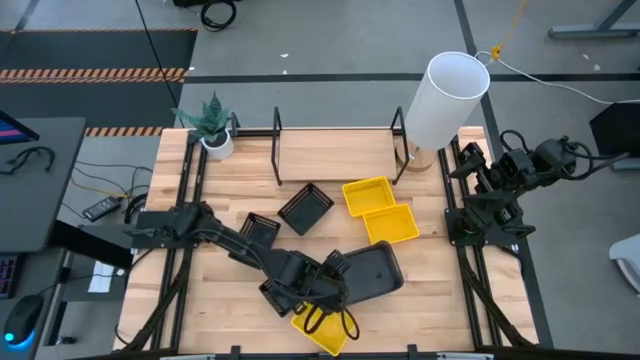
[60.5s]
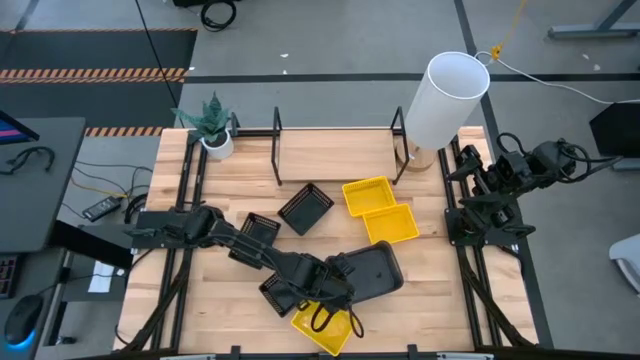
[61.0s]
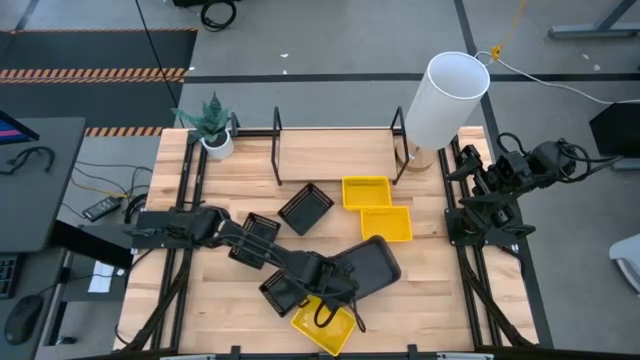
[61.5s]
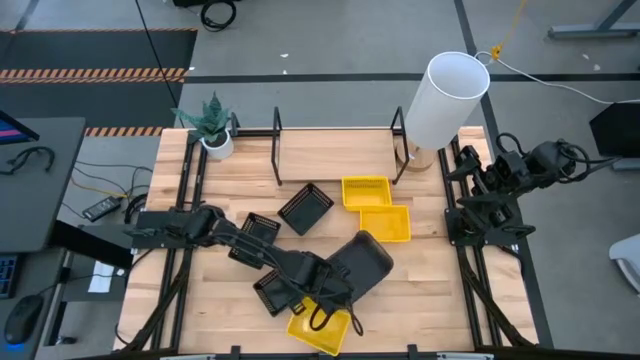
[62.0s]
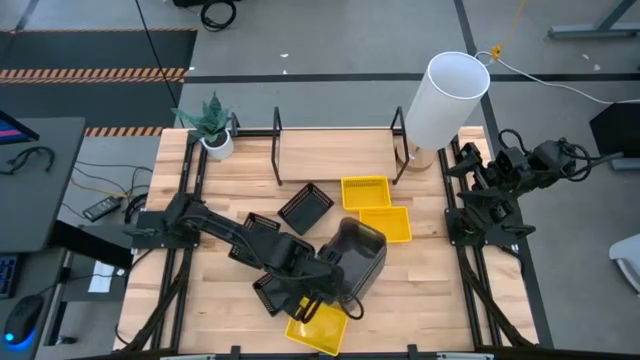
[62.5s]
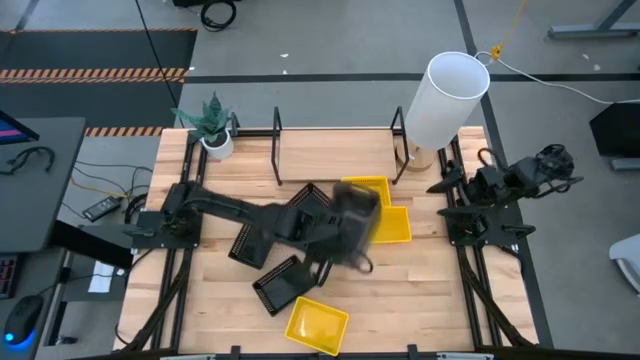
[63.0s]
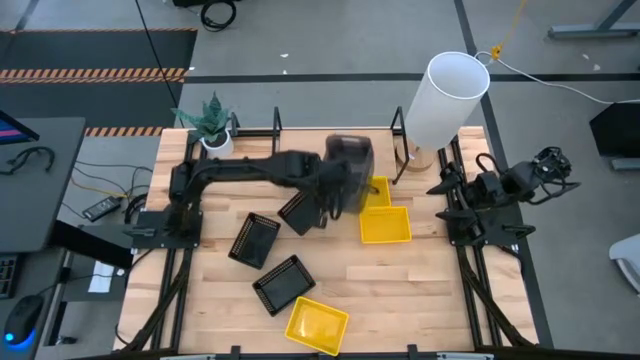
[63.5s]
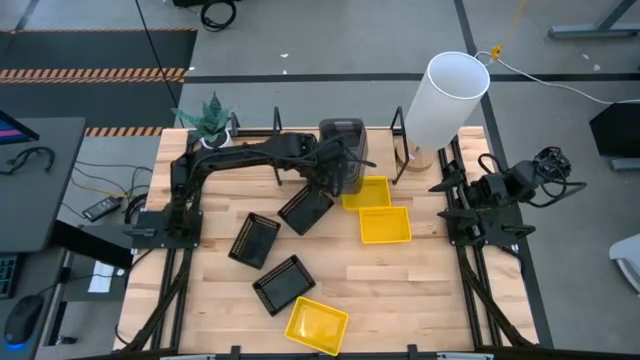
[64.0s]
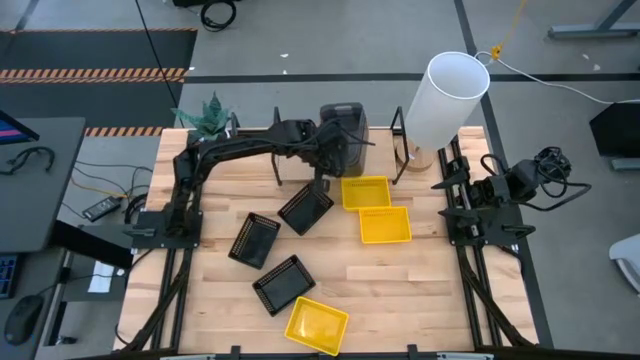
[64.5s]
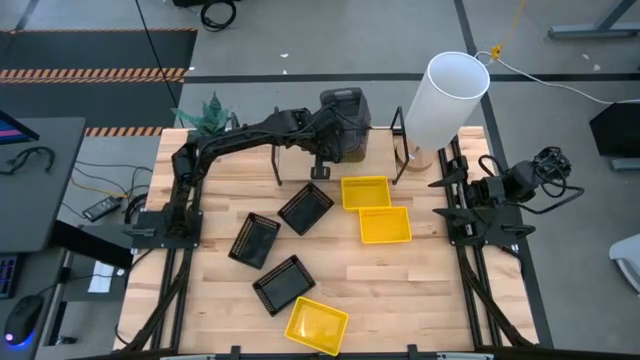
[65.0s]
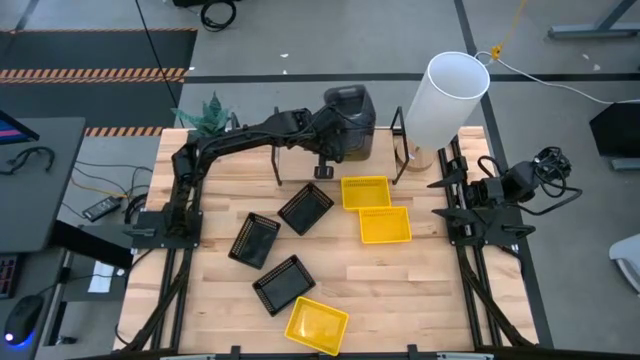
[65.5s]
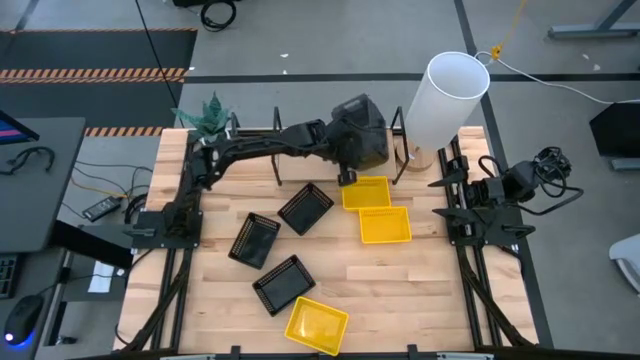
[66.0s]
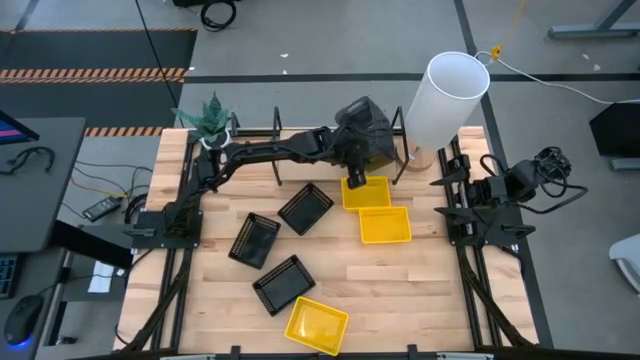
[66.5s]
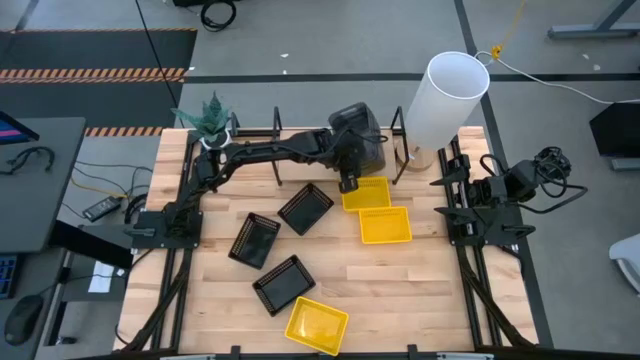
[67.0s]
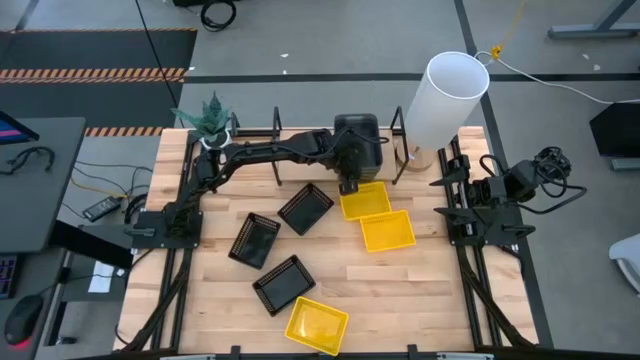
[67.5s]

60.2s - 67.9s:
Task: Stack baskets on shelf by color
Put the stacked black transparent bins on the shelf

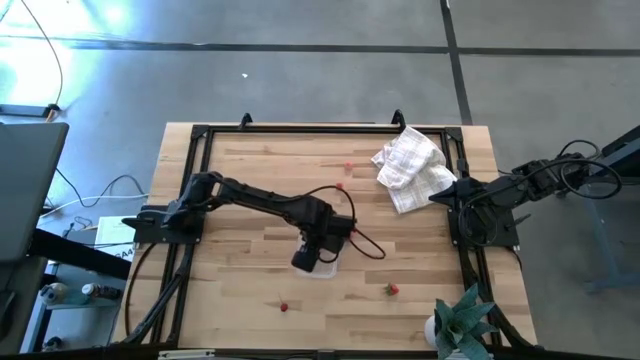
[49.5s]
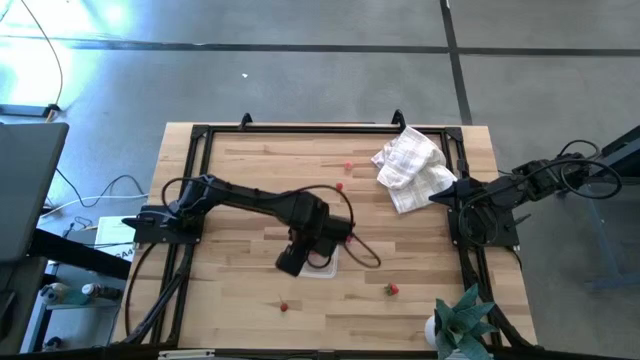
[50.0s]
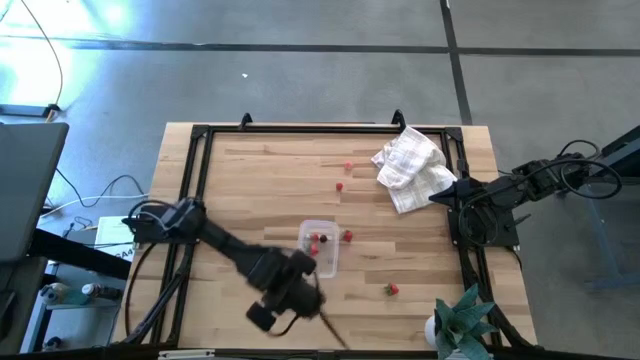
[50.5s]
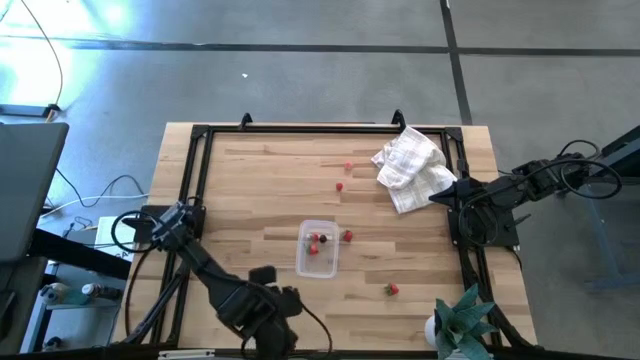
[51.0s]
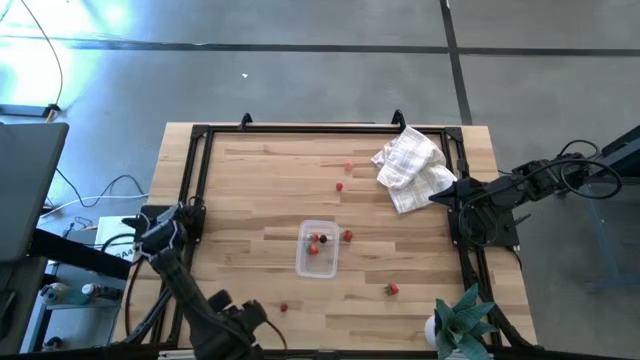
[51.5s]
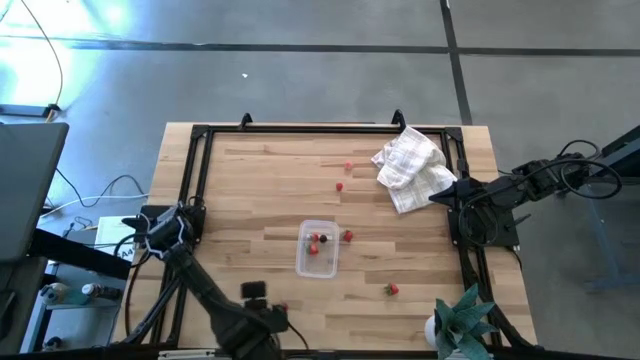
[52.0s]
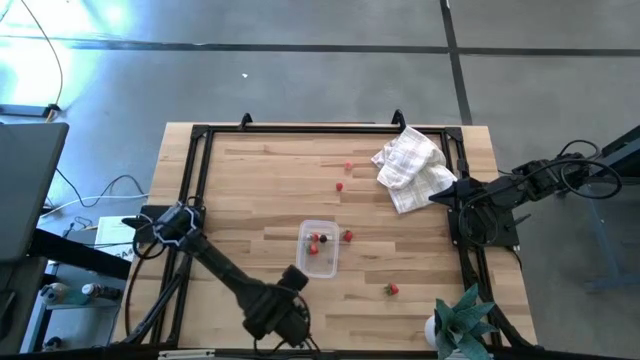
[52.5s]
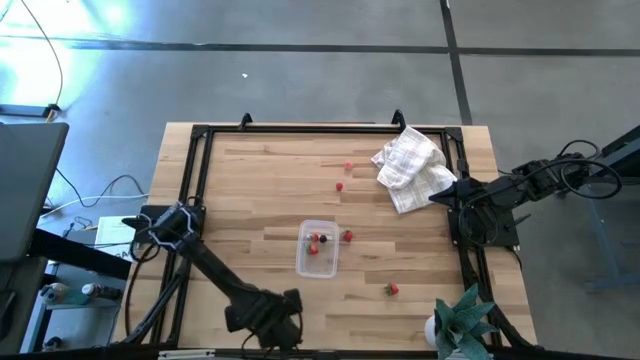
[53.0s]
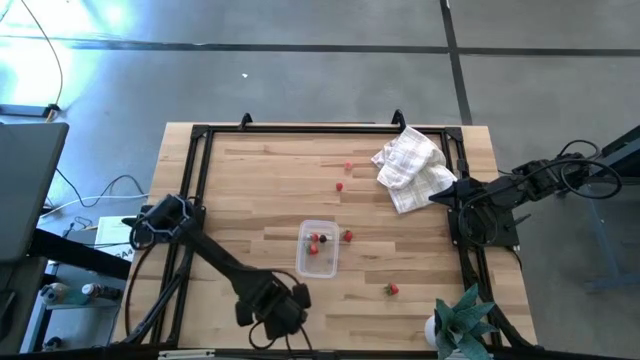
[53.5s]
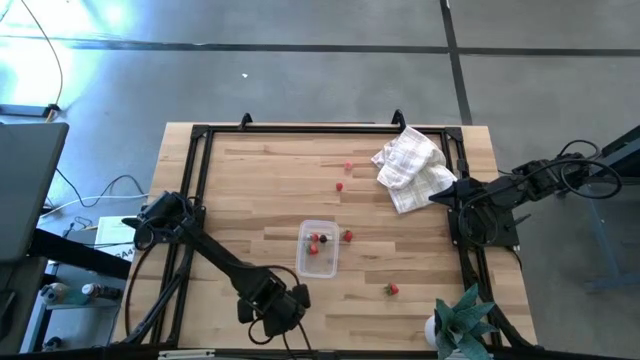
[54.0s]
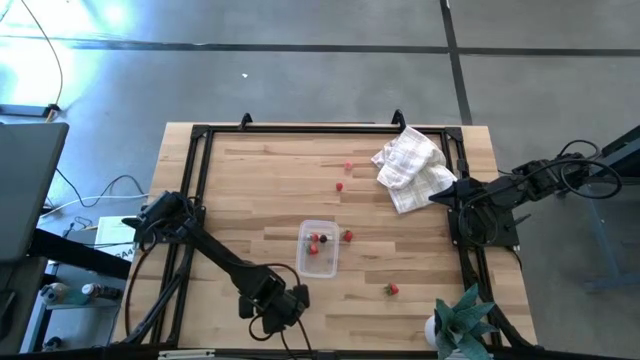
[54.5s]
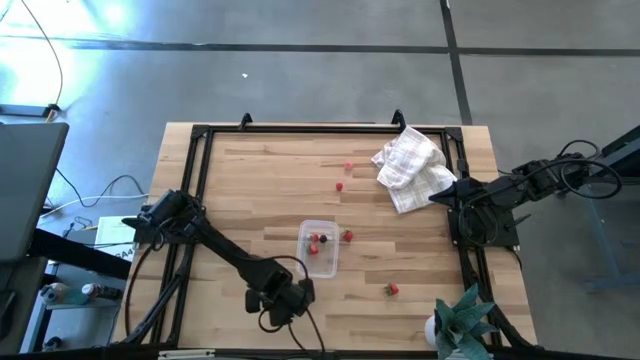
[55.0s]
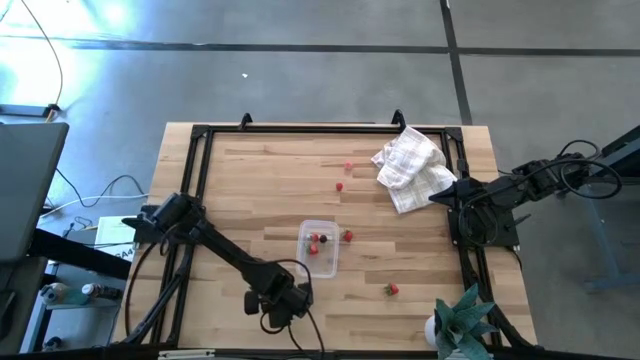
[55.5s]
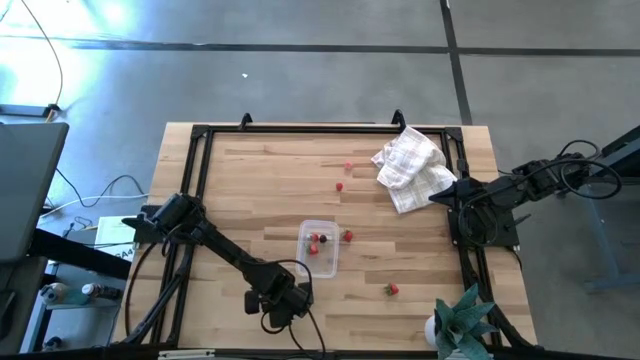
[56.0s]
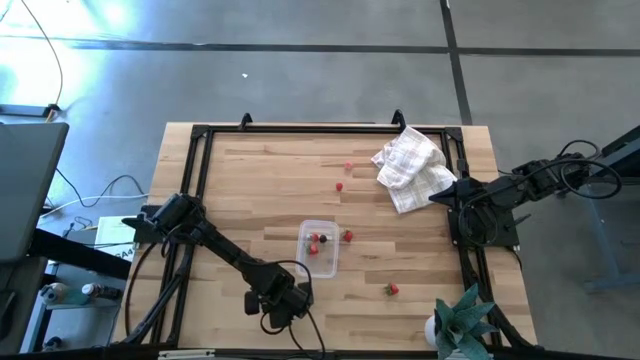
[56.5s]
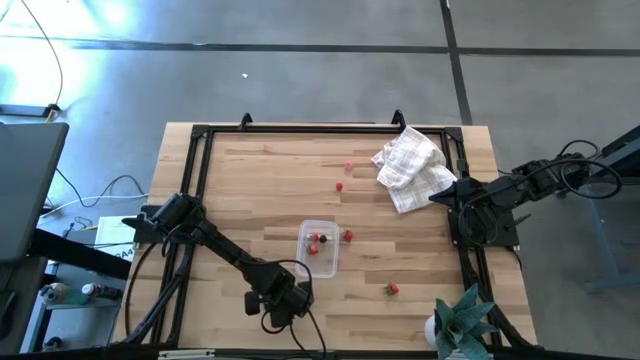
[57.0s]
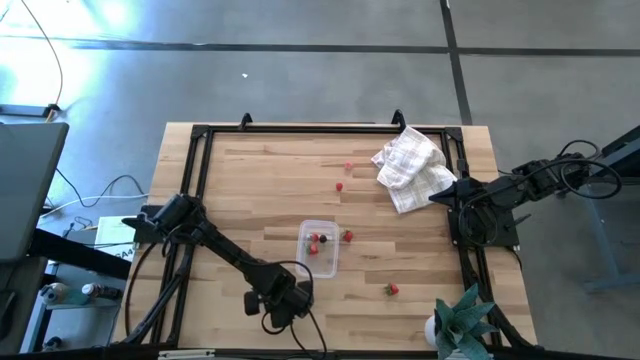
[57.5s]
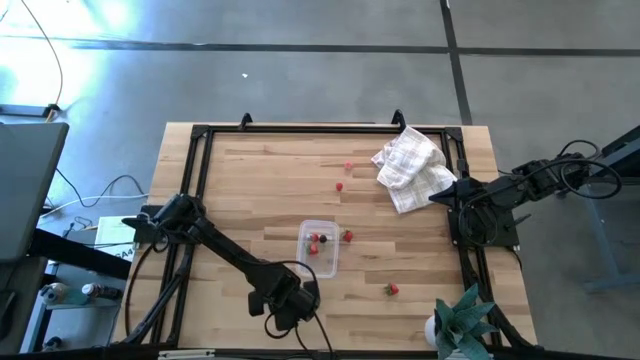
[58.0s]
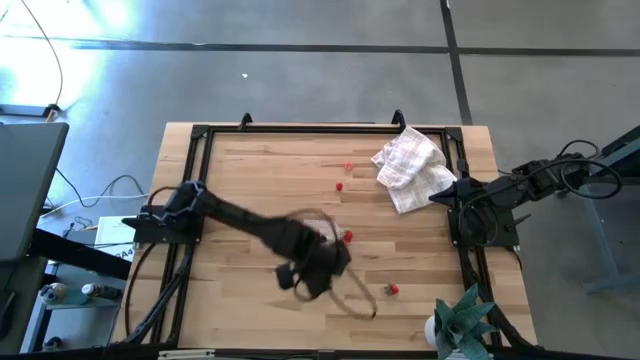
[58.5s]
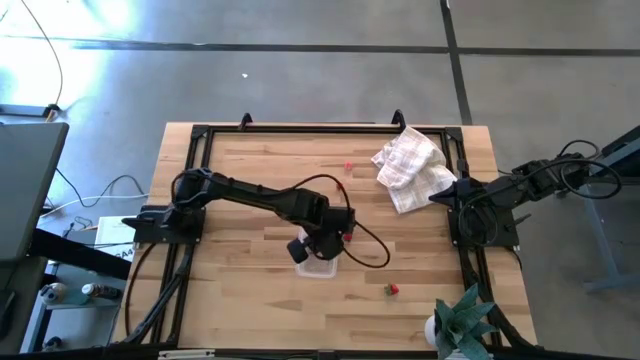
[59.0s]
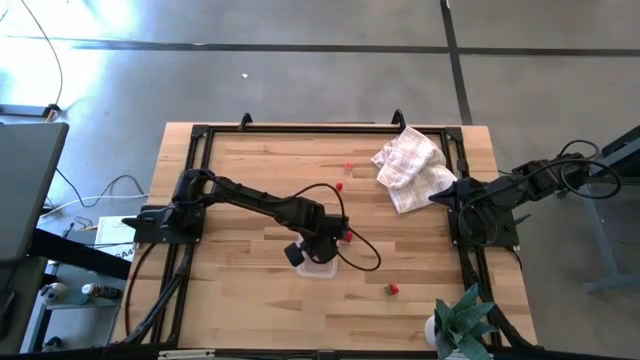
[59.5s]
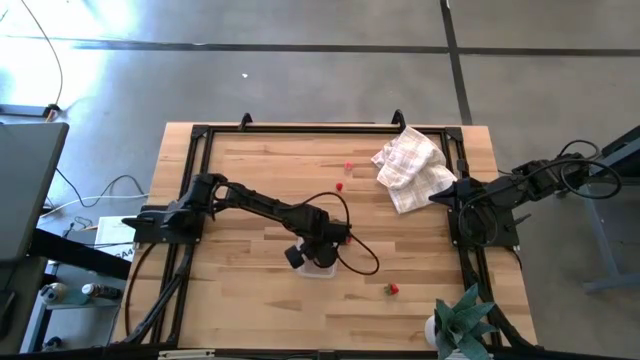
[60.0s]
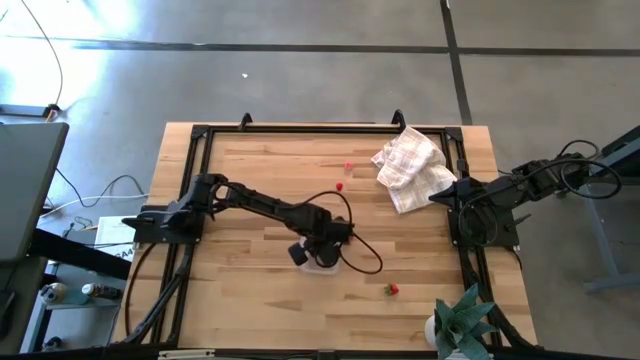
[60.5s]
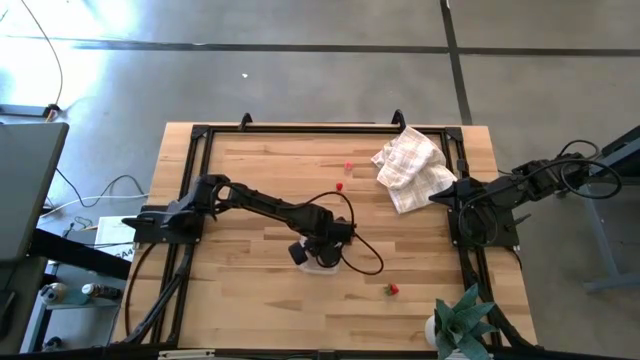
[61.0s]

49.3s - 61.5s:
Task: Pick and placing Produce into tupperware
Put the red cherry into the transparent container
